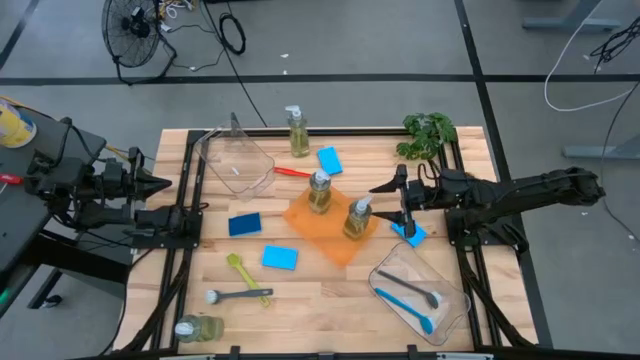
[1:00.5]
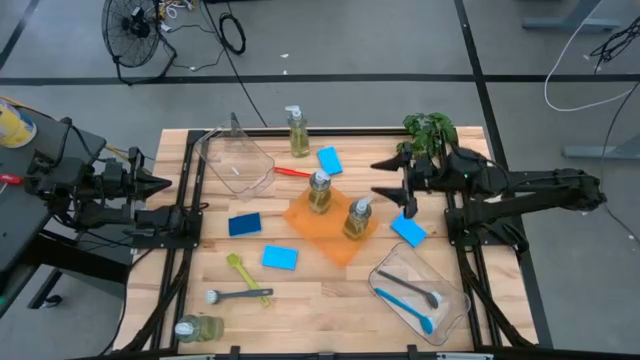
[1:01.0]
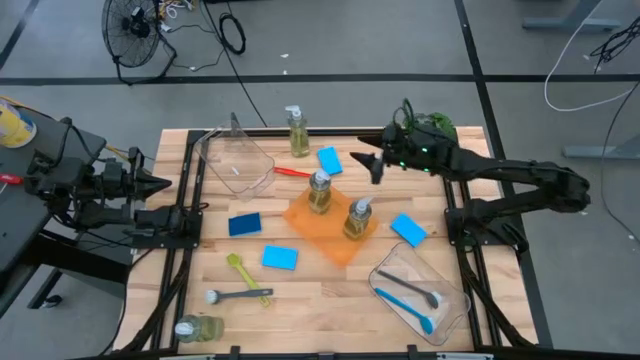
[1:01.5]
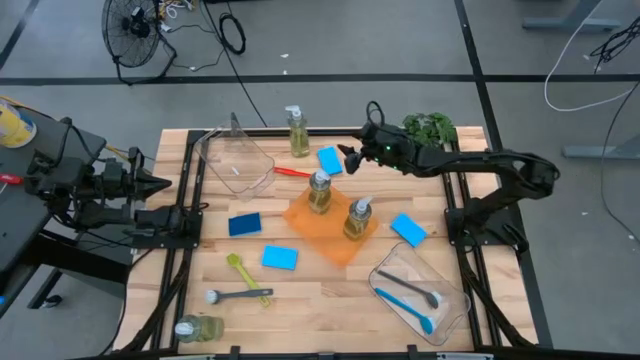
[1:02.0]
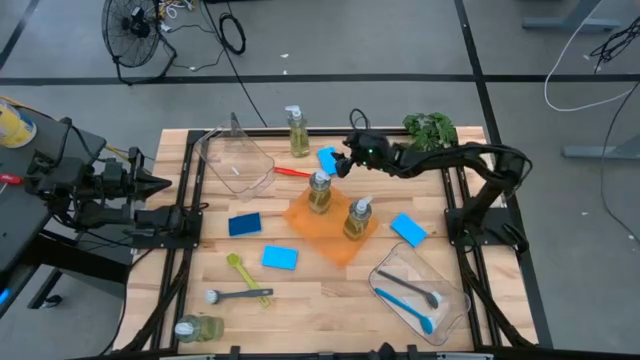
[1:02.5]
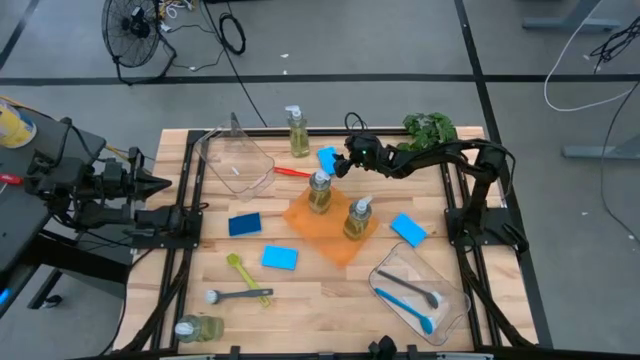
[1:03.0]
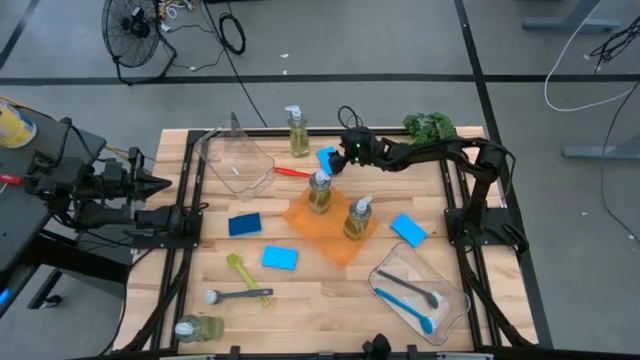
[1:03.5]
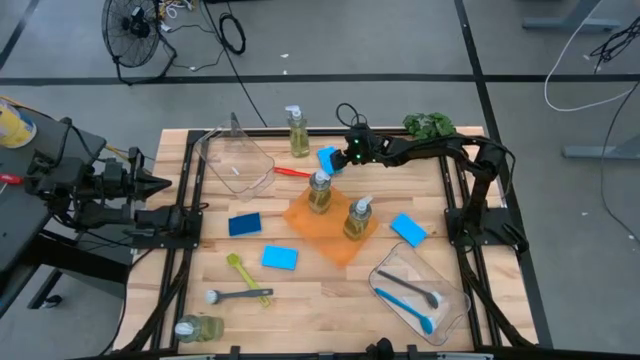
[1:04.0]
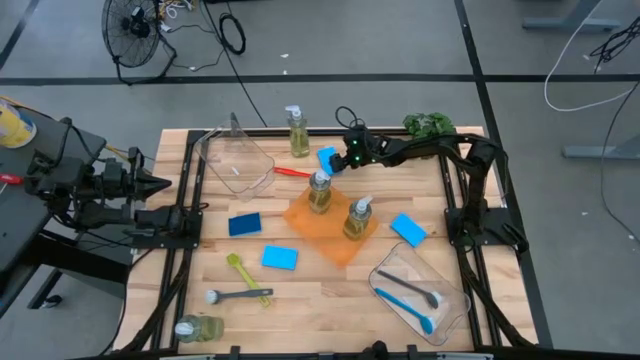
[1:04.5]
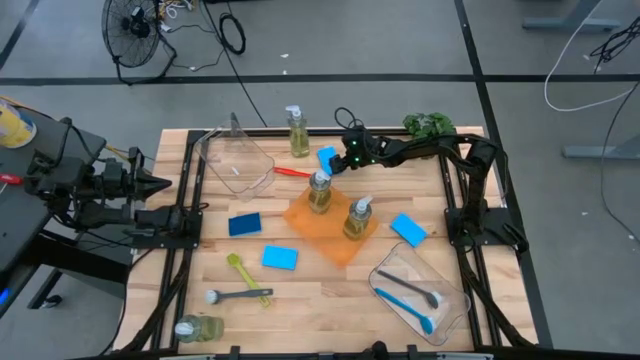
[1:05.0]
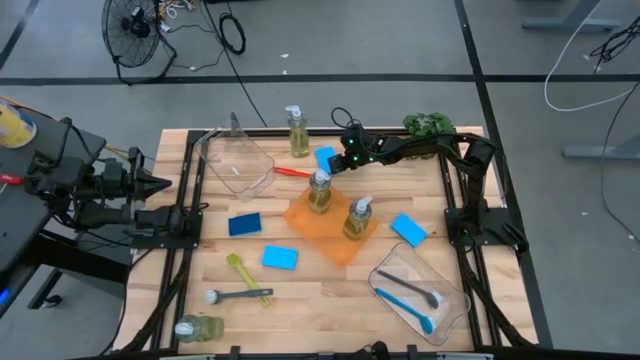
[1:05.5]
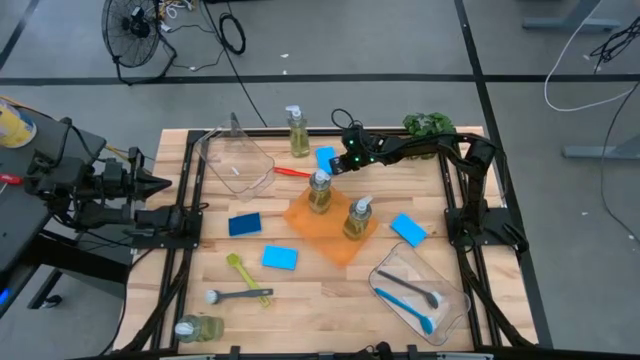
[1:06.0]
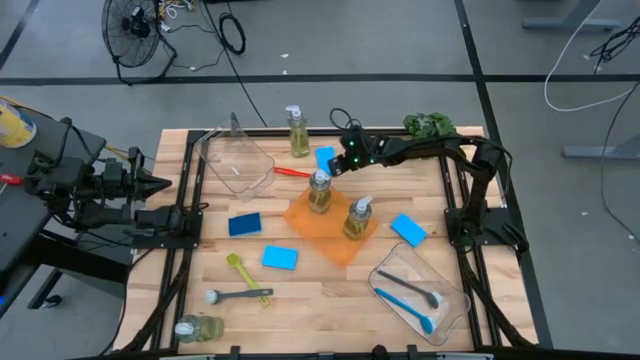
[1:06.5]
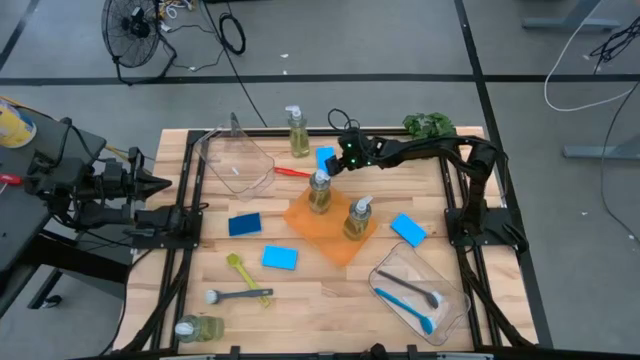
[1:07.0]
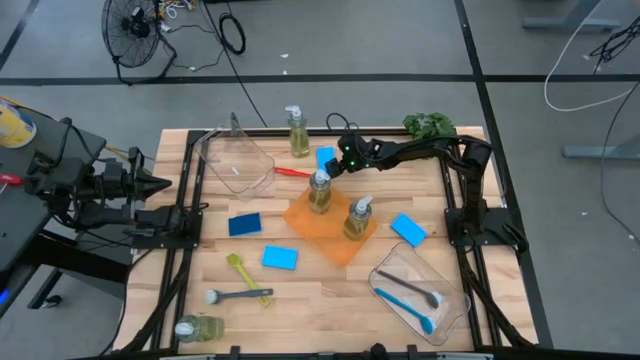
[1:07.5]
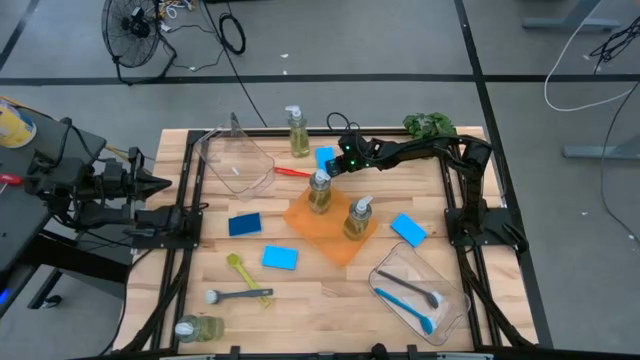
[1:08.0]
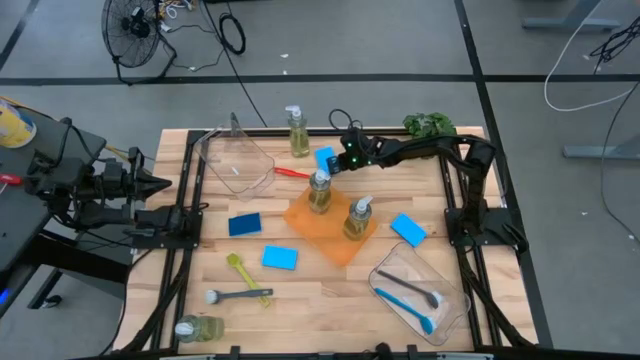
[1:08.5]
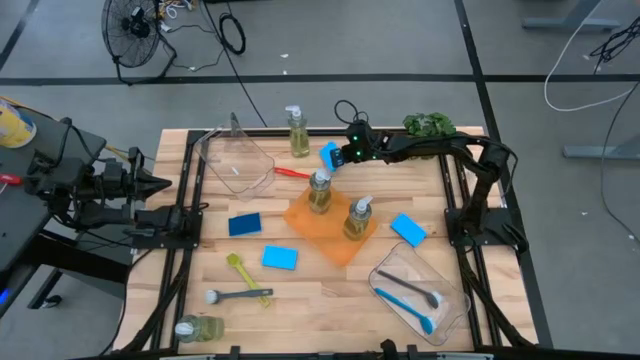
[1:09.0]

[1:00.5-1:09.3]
Task: Pick & Place Kitchen Sink Supplies
Put the blue sponge into the top transparent bin

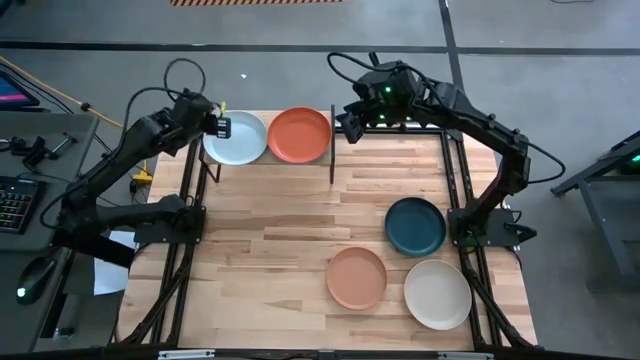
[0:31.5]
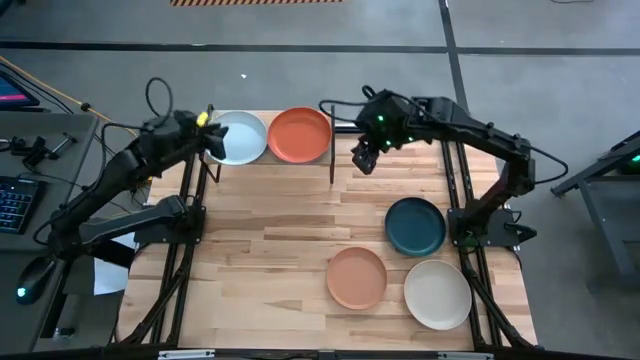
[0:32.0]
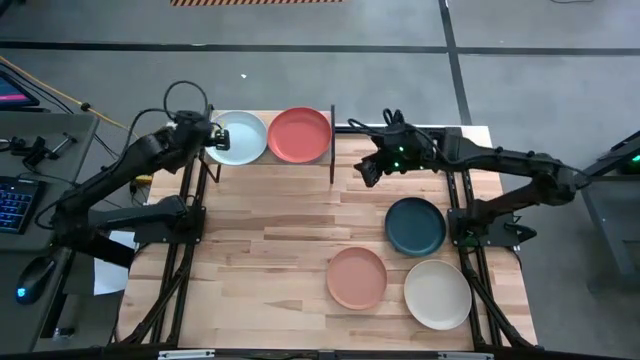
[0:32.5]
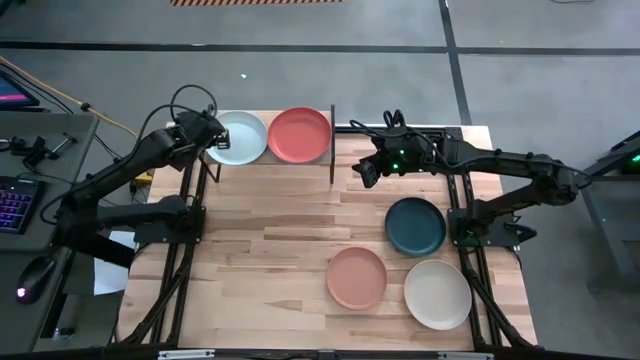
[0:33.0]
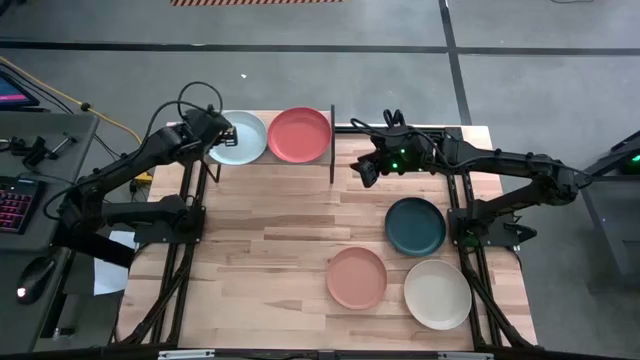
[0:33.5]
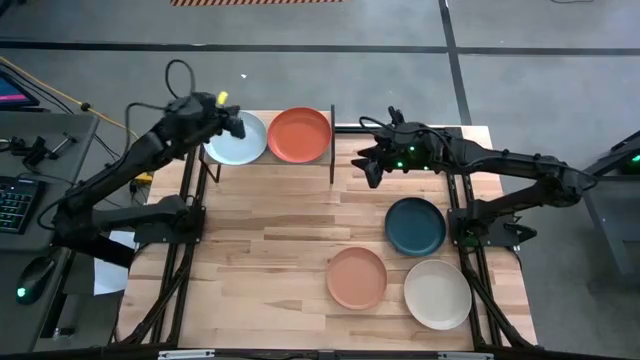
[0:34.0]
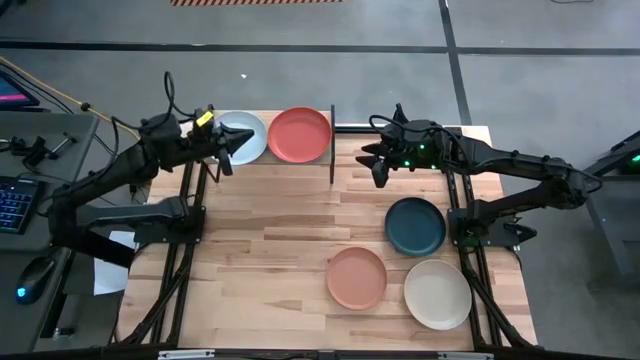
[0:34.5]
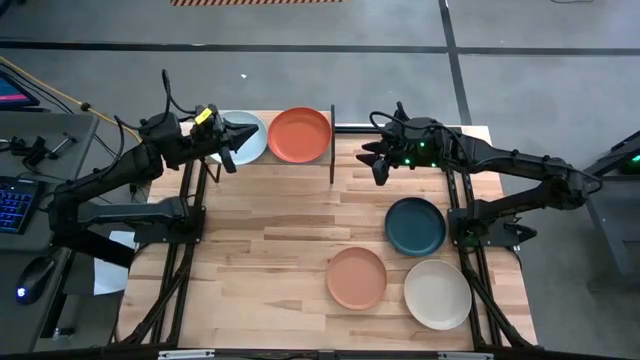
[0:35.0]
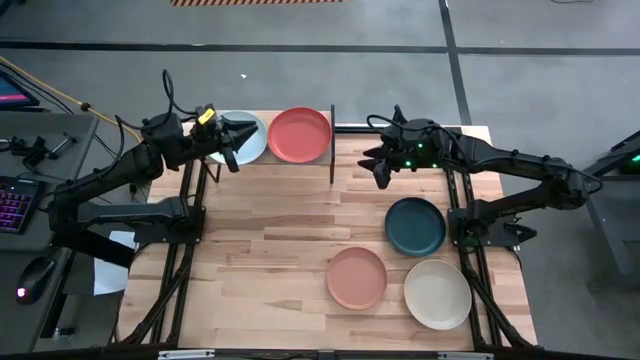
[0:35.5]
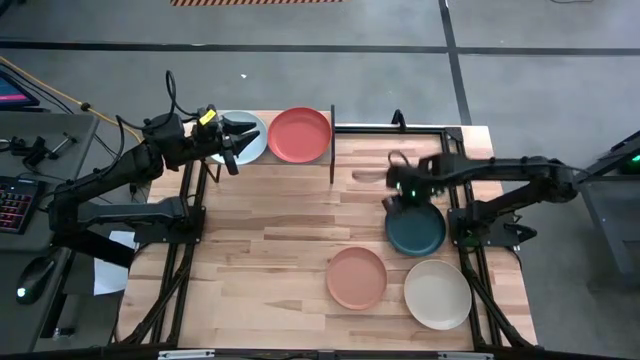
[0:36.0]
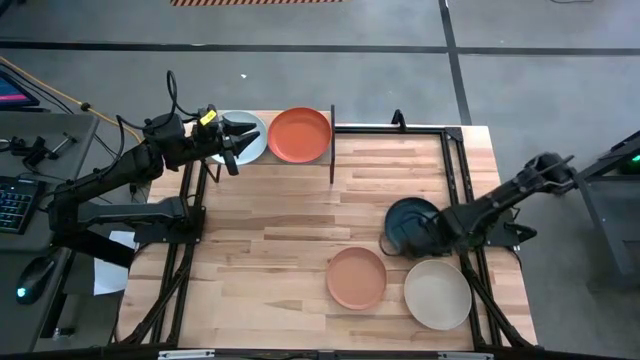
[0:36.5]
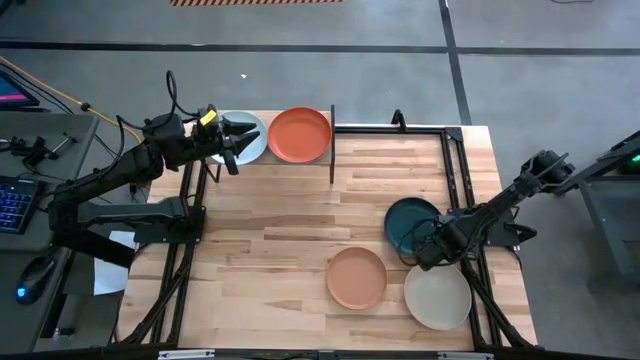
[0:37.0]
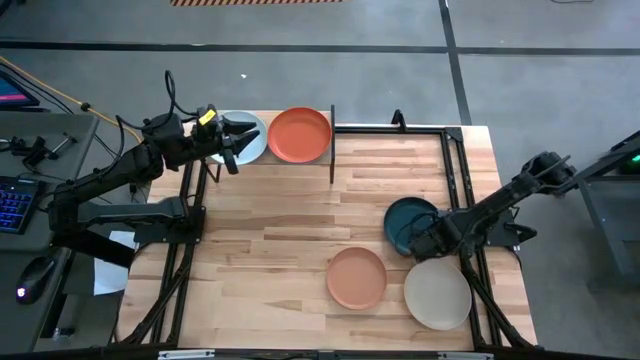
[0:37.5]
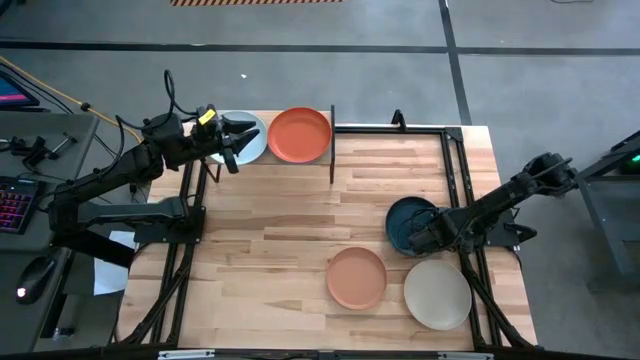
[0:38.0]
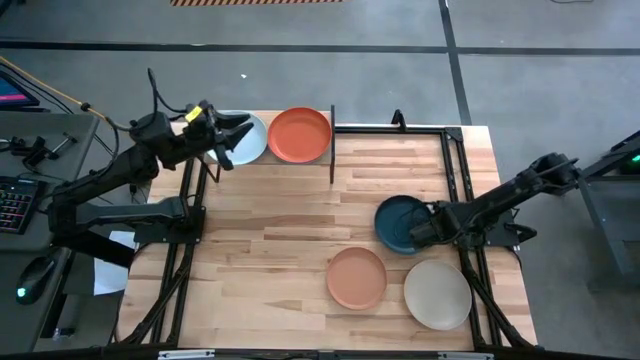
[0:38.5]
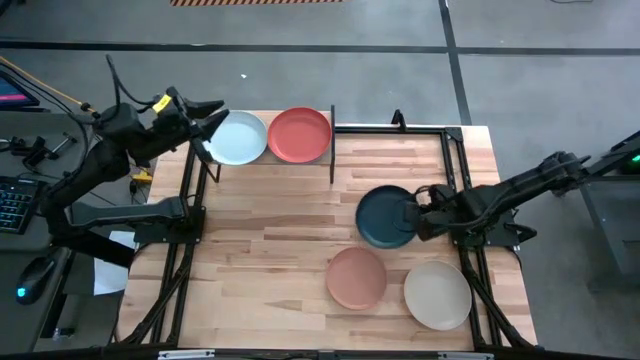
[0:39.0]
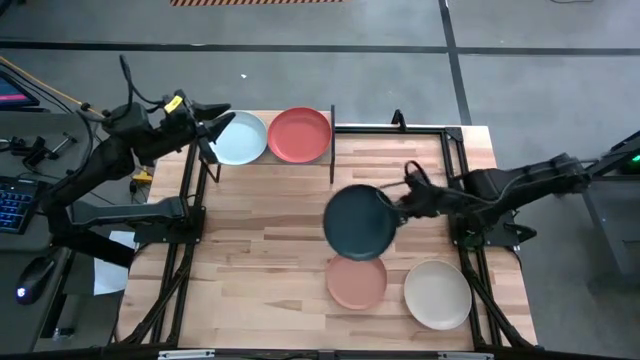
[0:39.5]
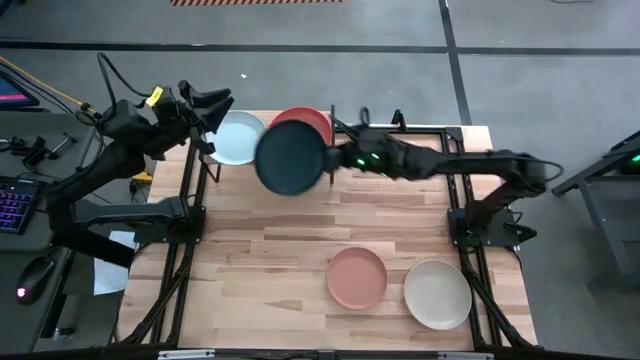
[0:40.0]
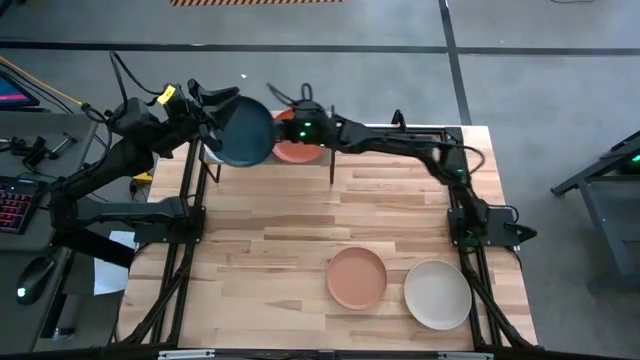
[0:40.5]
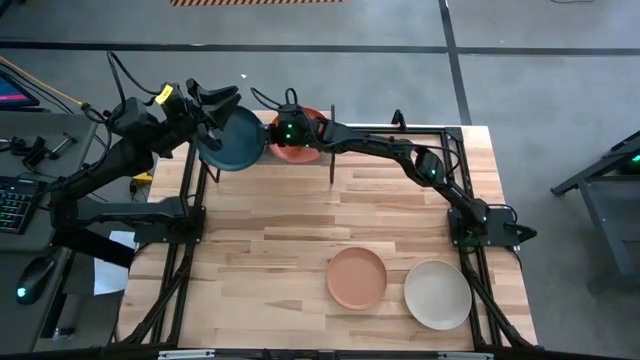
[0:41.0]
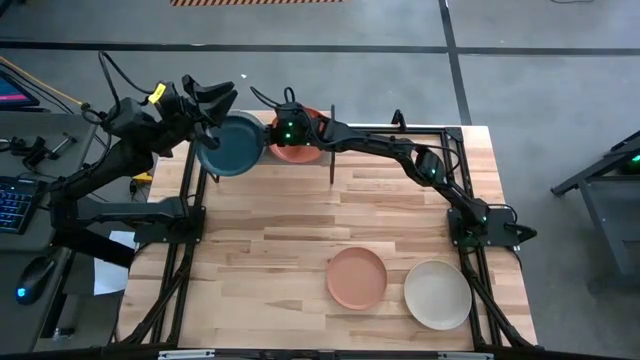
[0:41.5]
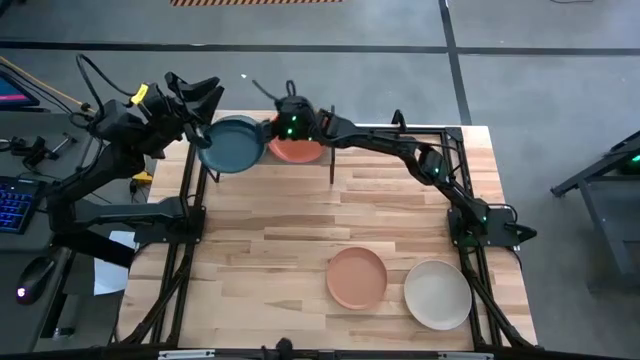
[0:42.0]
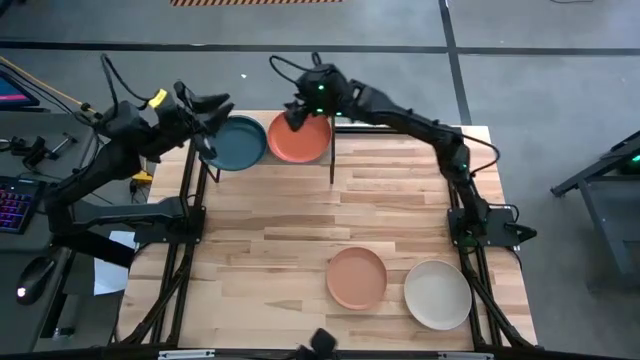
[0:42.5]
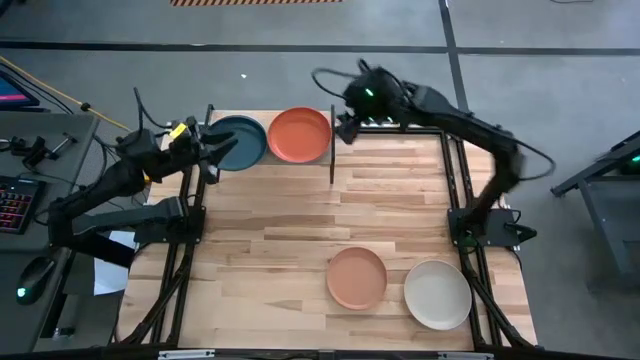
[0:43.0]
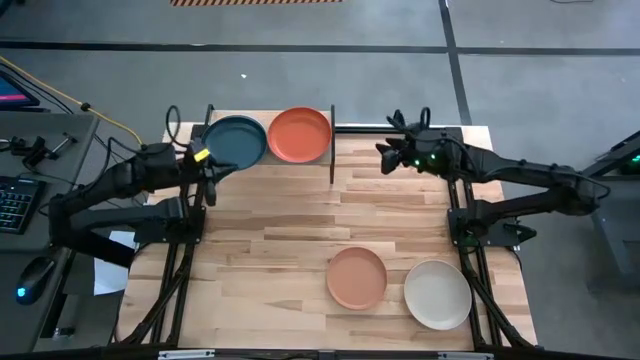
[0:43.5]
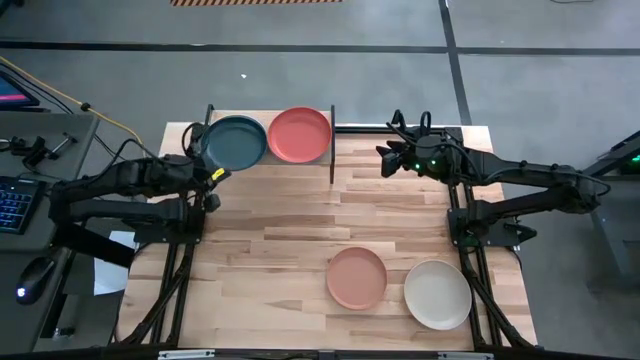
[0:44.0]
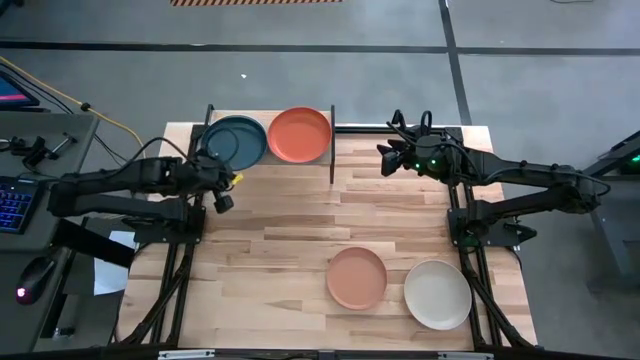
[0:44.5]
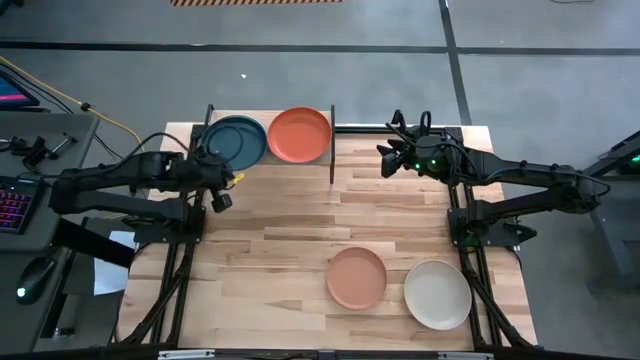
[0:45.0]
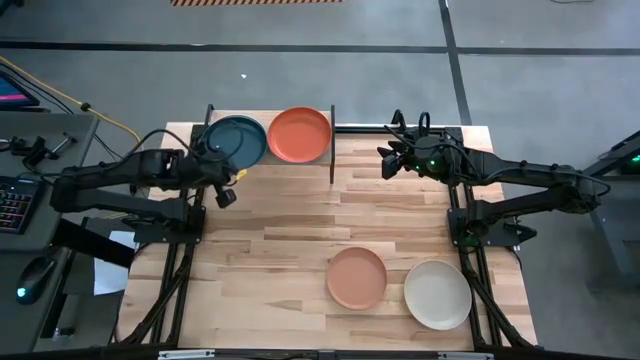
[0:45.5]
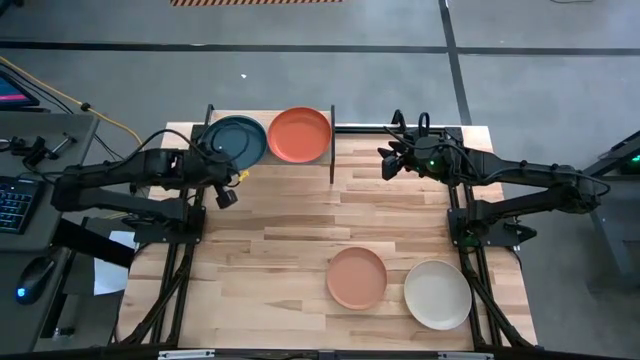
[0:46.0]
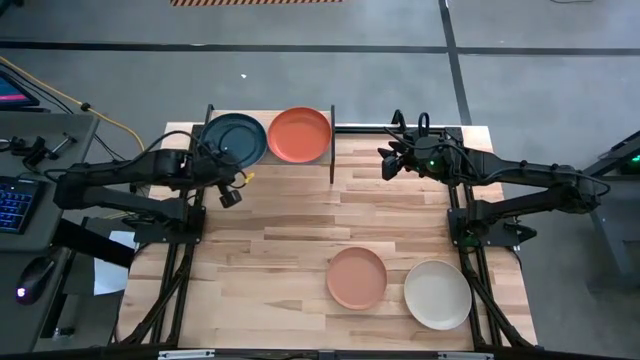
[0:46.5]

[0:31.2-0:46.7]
Task: Place and stack plates onto a shelf
Stack the dark blue plate on top of the gray plate on the shelf
